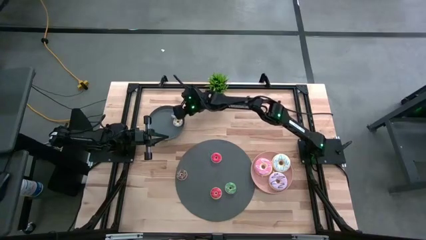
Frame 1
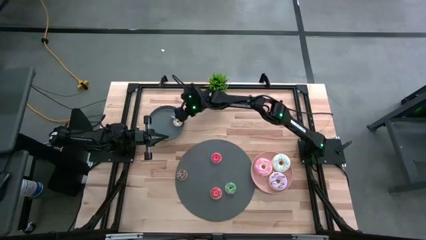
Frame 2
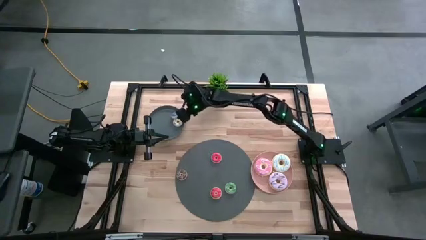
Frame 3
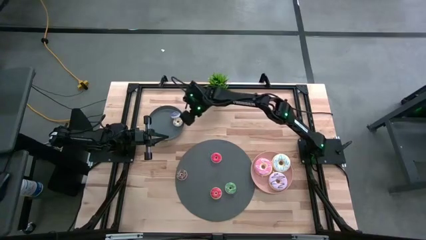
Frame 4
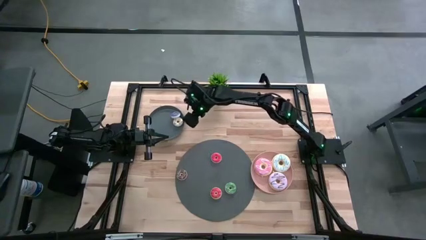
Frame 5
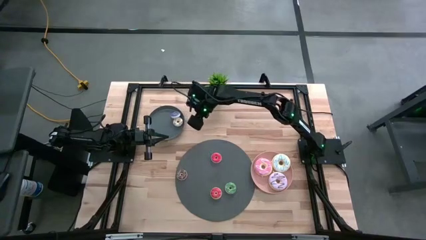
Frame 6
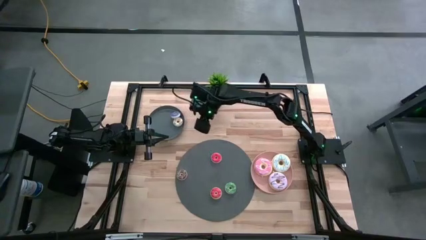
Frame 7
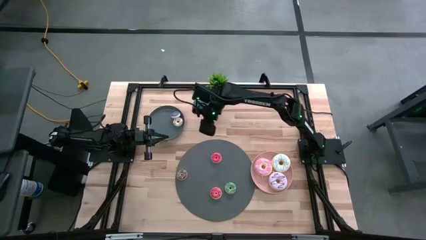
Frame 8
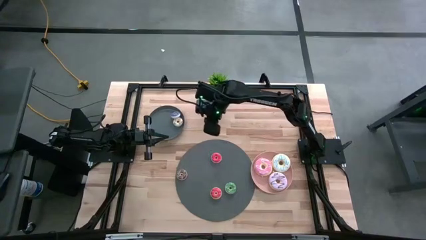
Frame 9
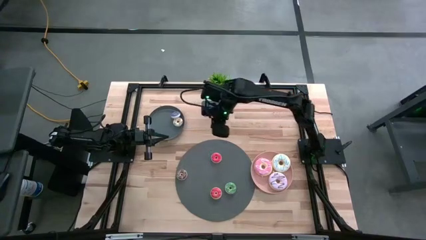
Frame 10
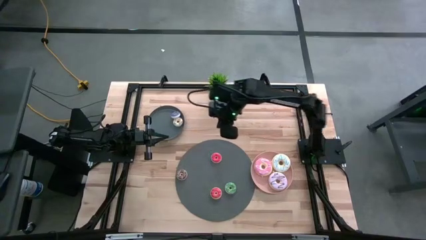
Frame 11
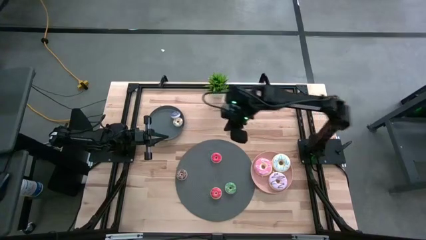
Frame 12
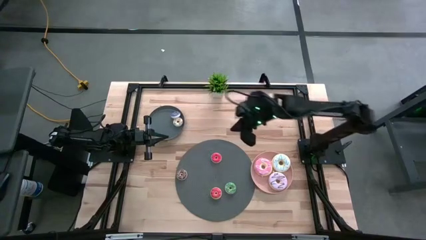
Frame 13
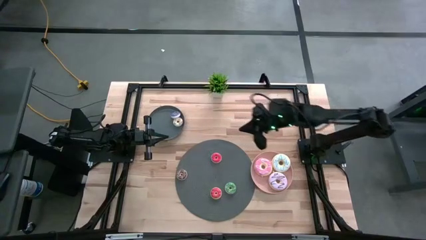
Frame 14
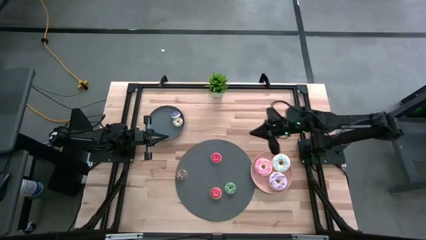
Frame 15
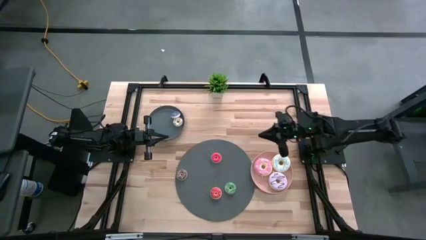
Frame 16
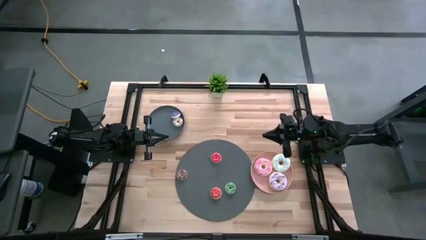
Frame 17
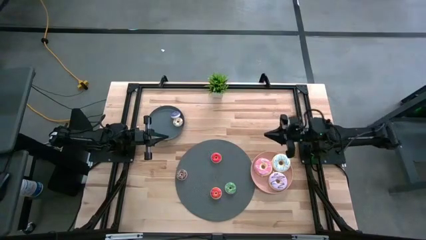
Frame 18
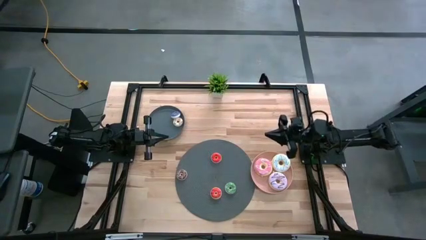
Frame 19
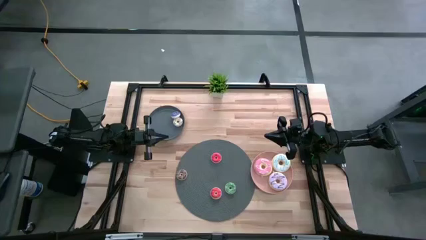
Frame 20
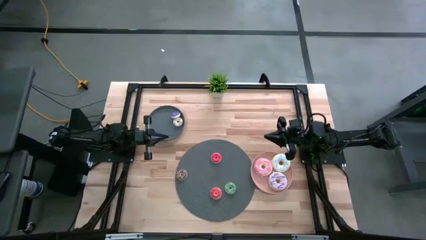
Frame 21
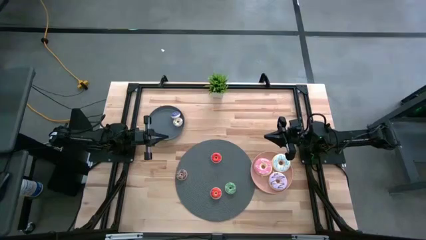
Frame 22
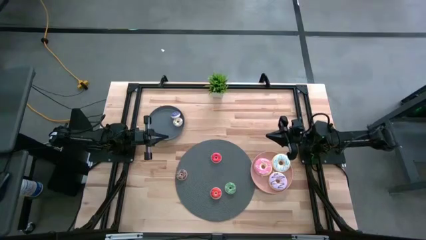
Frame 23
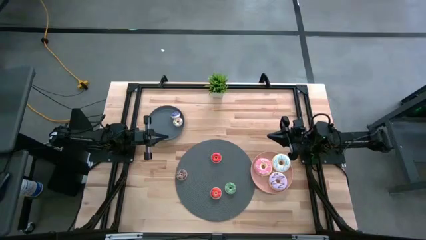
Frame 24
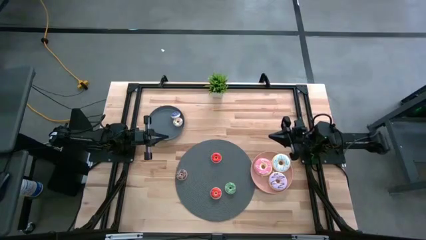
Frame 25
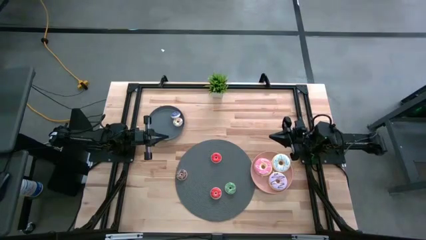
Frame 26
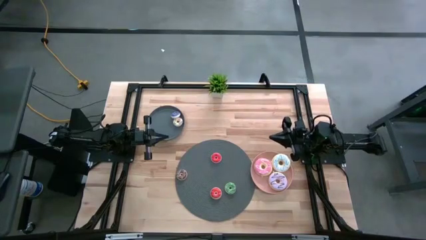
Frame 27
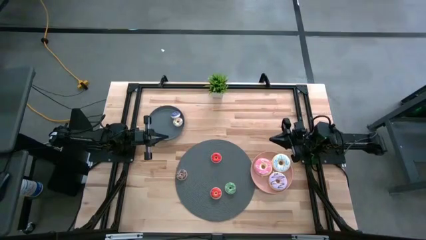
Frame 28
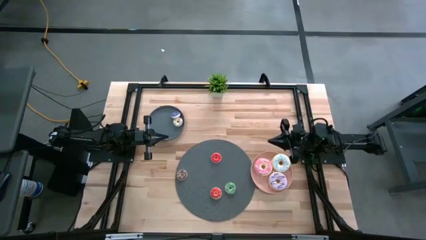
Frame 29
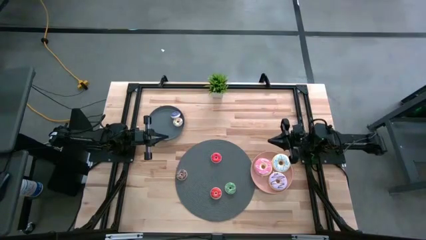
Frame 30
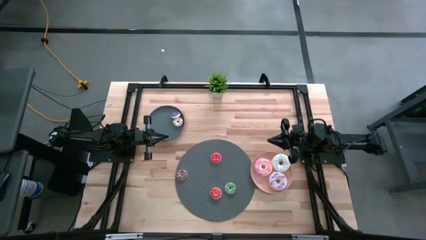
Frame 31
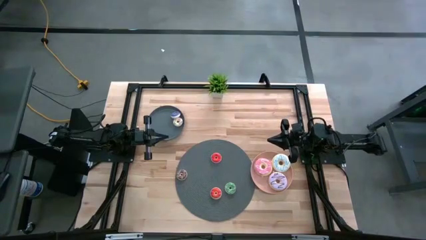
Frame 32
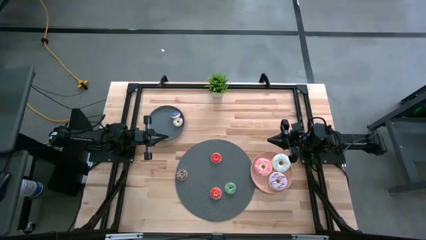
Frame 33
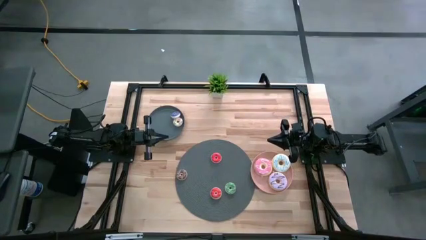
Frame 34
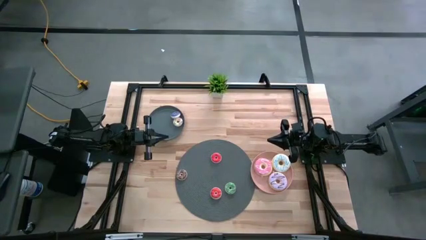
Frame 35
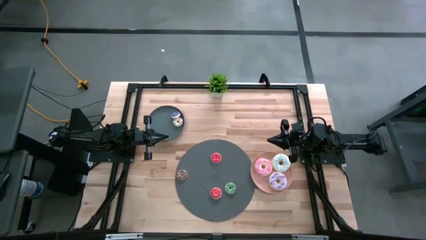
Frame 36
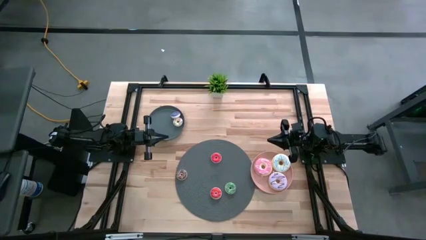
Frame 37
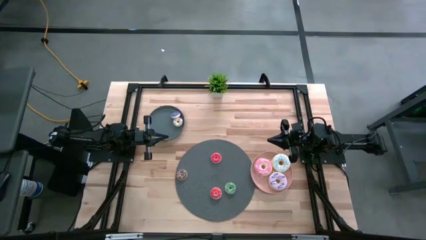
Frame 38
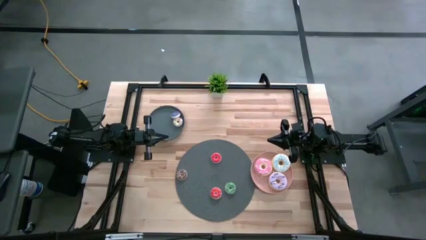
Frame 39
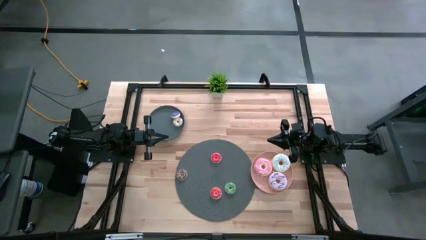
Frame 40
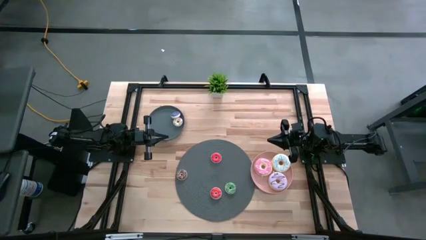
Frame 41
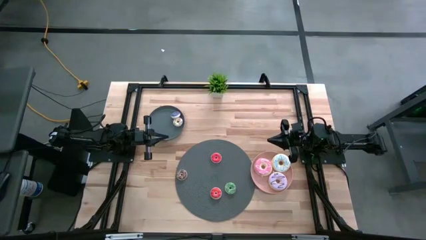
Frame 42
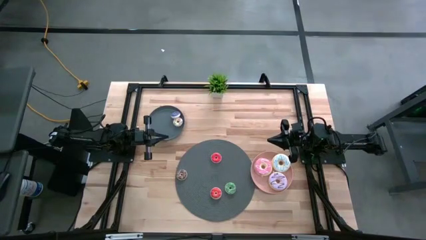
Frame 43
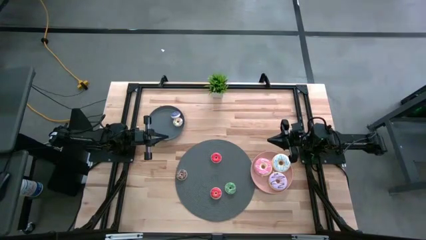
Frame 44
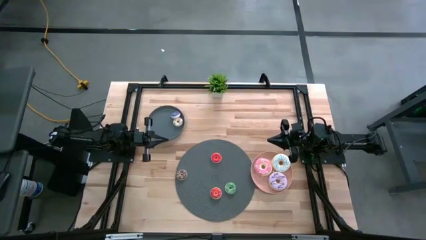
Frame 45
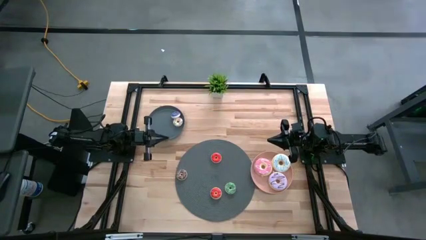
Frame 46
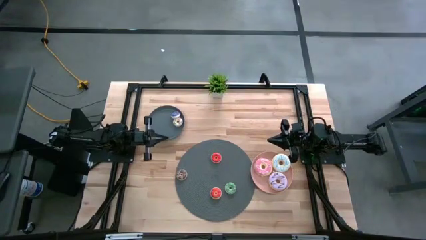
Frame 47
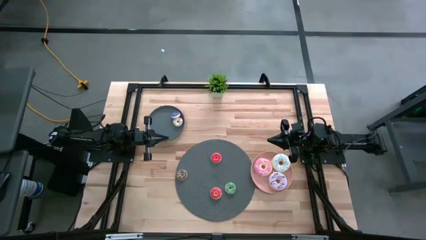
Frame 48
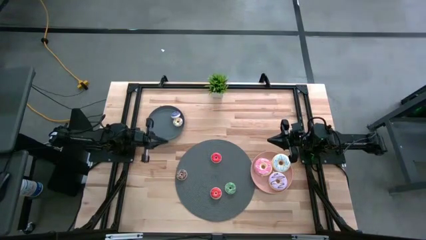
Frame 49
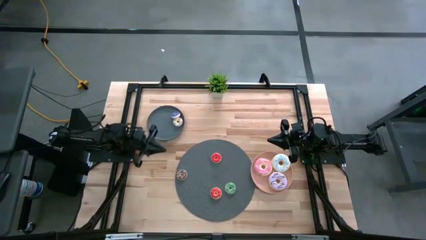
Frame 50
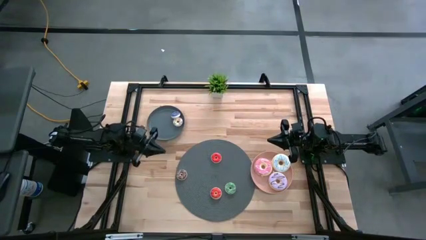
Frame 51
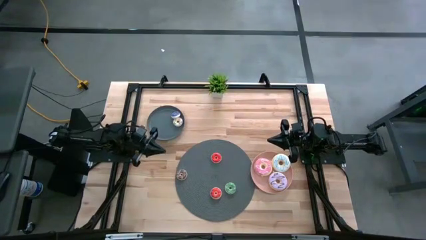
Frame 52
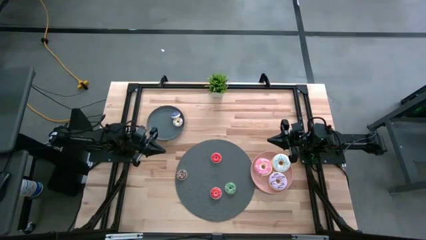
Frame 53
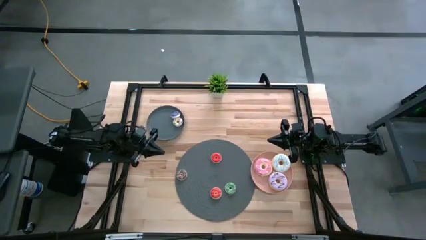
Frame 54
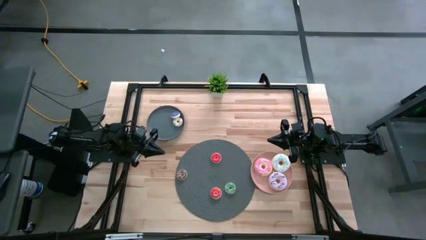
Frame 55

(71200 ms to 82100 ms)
Task: Pick & Place donuts
Put the small brown donut on the gray plate

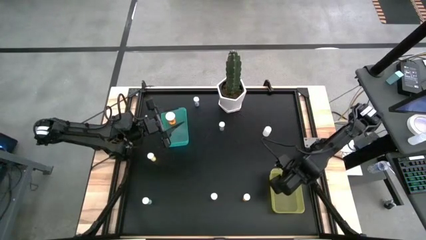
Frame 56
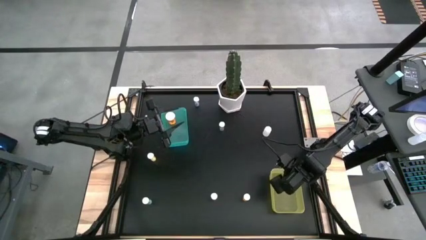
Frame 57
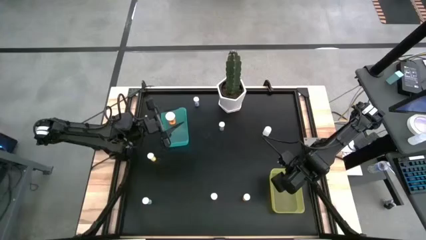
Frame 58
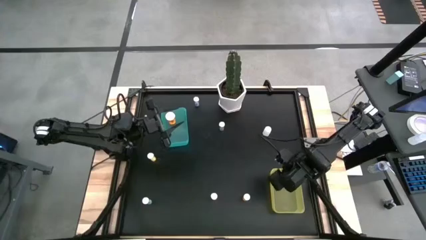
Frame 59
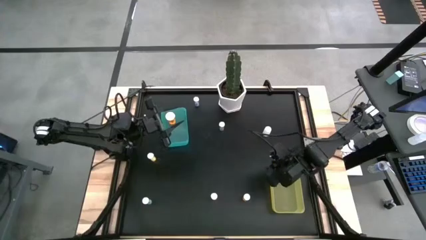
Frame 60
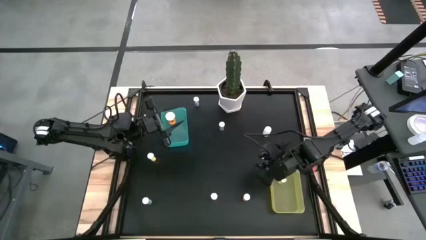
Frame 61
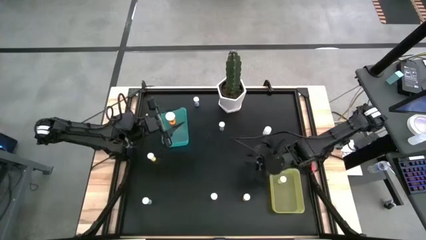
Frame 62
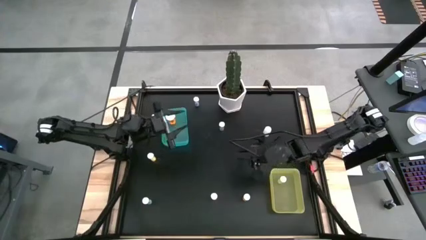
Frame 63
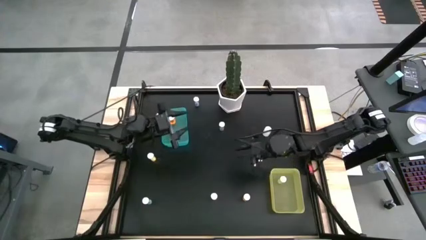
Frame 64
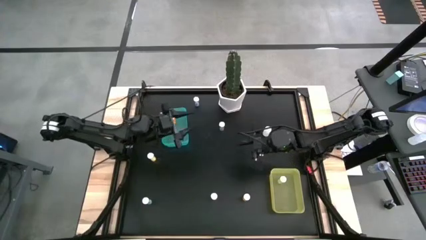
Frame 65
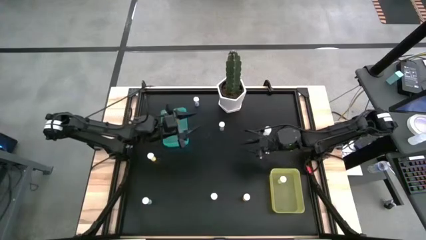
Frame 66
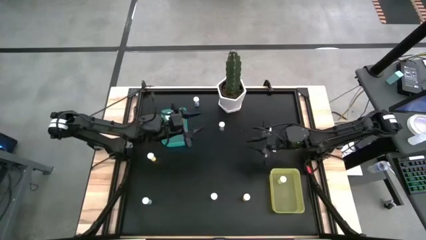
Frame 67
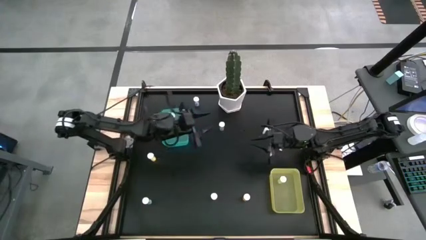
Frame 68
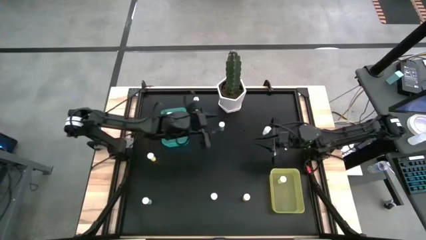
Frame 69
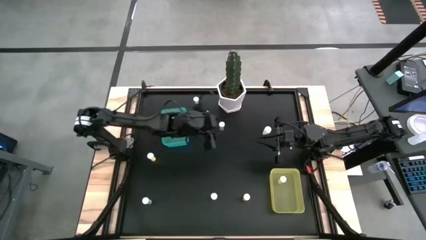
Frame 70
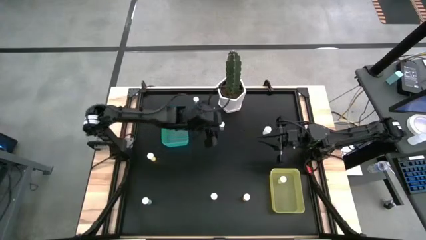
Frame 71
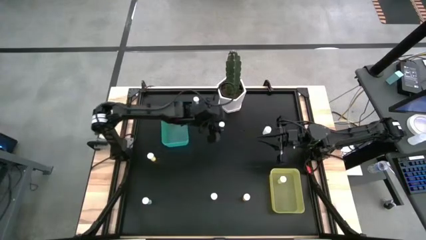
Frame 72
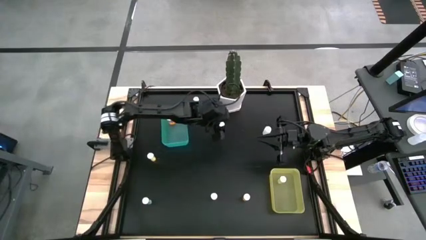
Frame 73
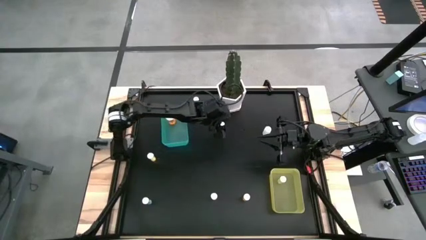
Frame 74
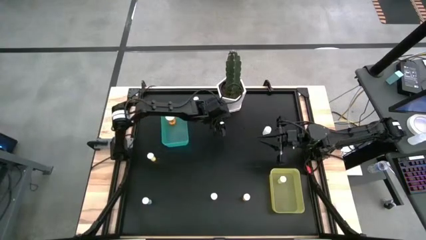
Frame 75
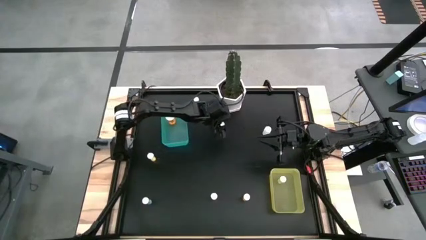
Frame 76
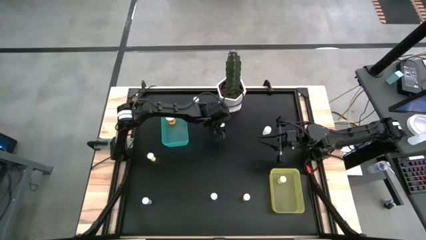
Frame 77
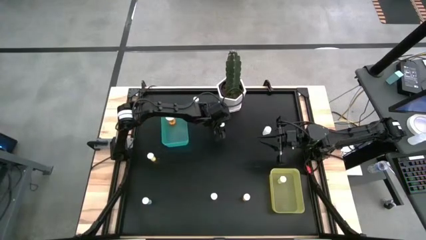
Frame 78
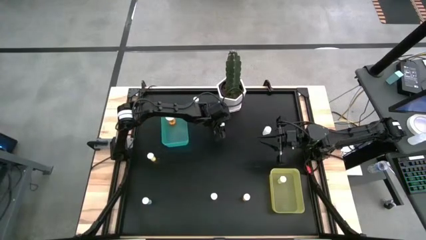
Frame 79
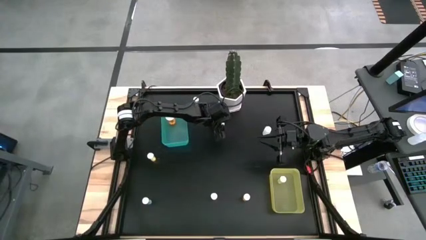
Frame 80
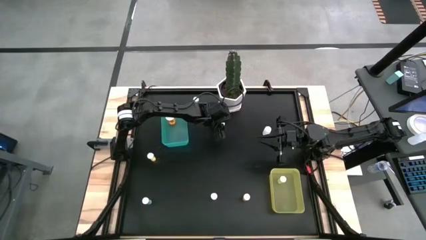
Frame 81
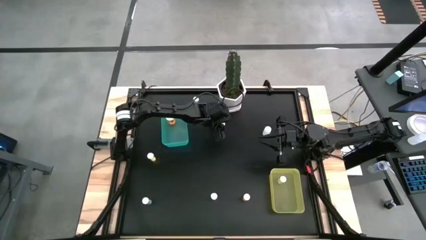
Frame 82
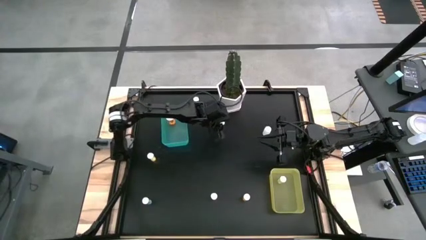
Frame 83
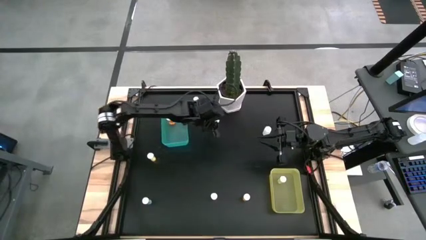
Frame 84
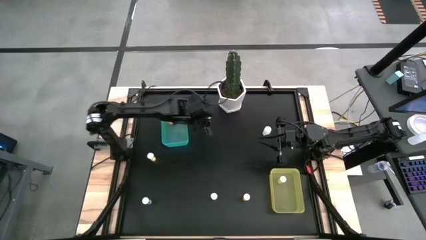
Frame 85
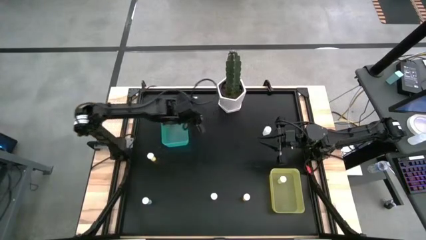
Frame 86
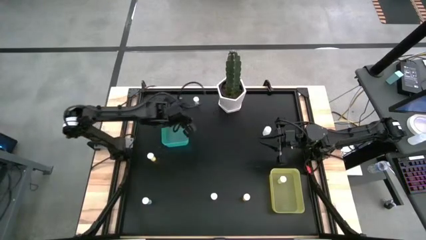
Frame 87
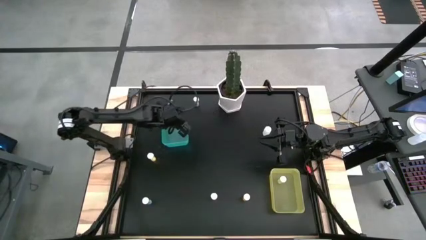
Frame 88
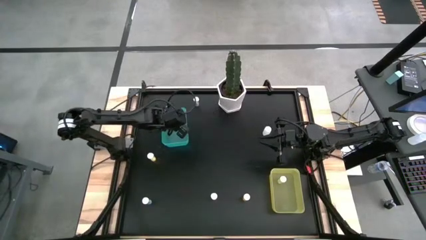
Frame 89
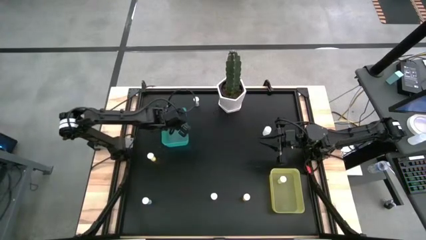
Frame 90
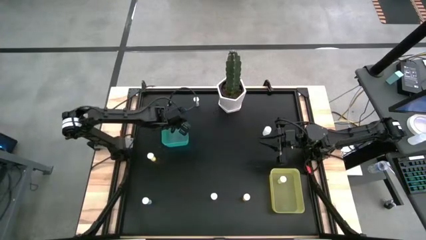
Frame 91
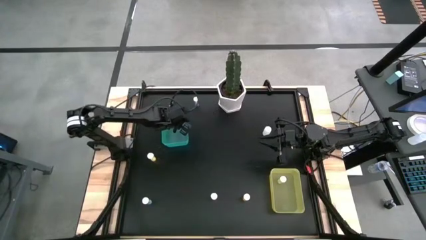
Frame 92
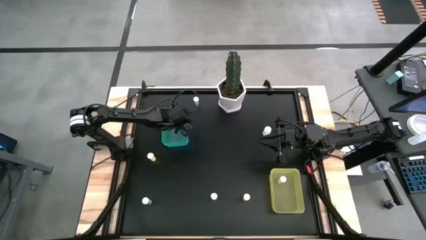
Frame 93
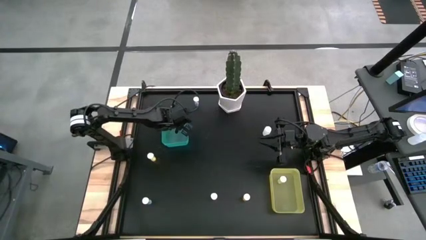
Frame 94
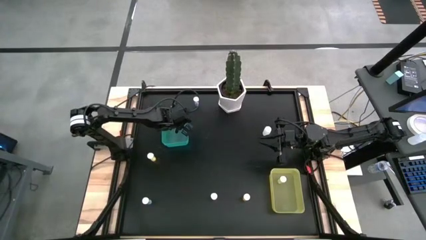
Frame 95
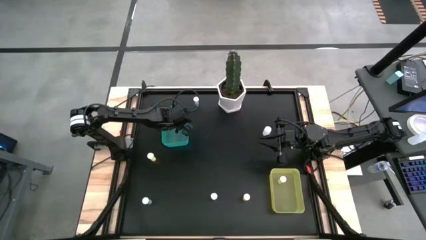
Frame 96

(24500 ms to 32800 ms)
Task: Pick and place medicine bottles into bin by pill shape (circle, oval)
Put the middle blue capsule bottle into the blue bin
